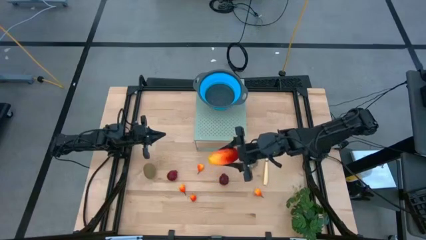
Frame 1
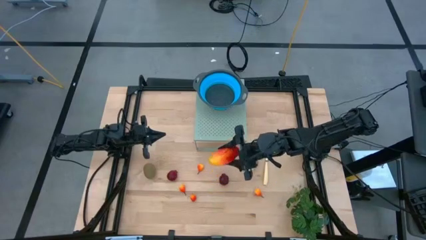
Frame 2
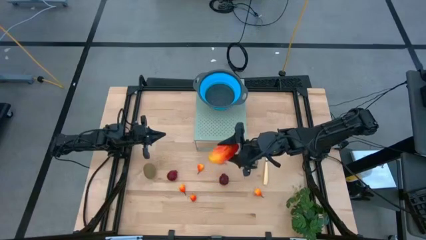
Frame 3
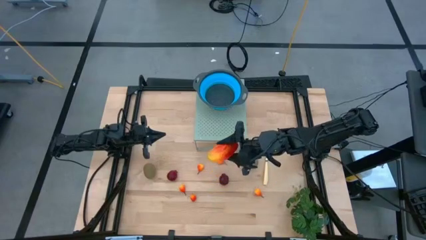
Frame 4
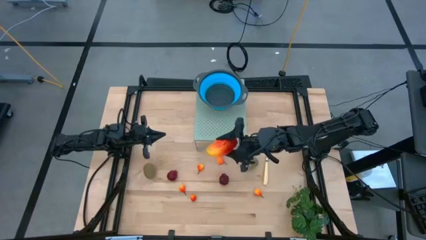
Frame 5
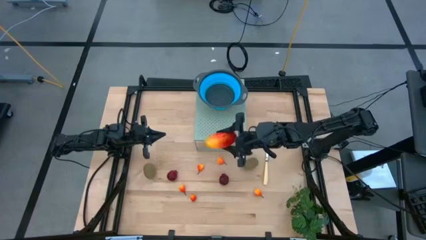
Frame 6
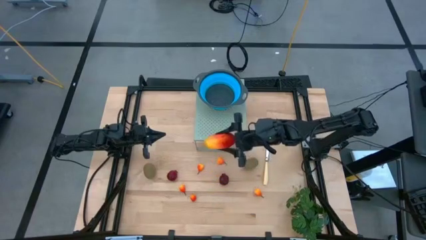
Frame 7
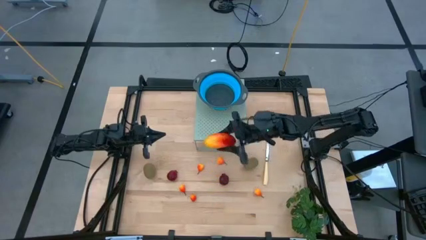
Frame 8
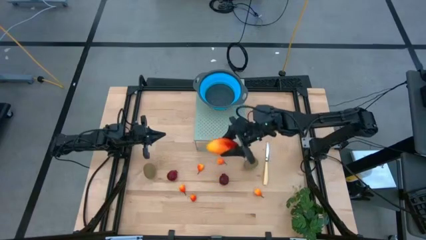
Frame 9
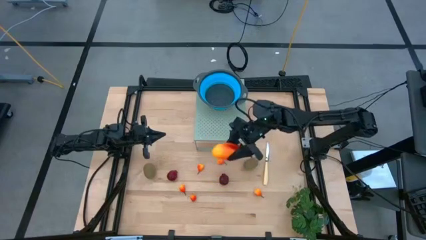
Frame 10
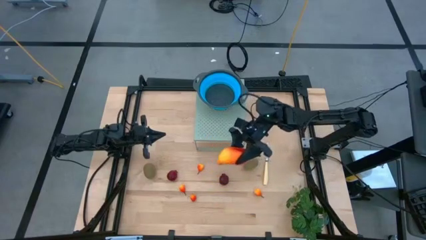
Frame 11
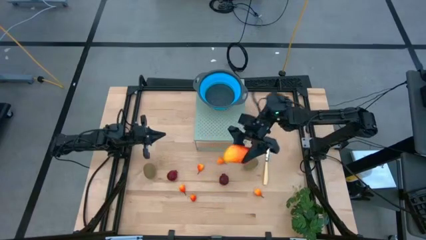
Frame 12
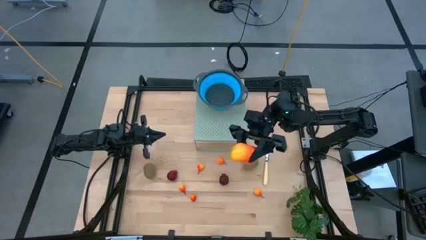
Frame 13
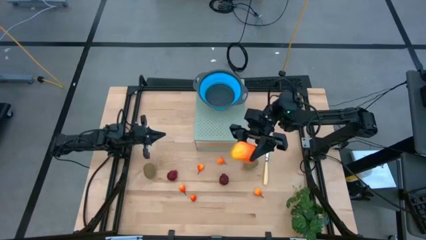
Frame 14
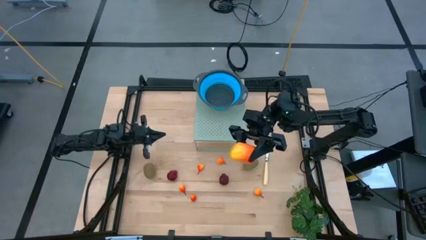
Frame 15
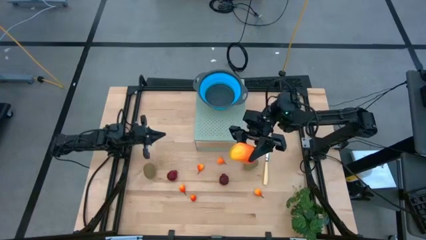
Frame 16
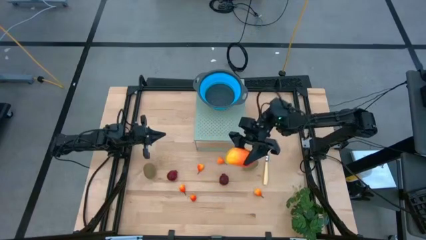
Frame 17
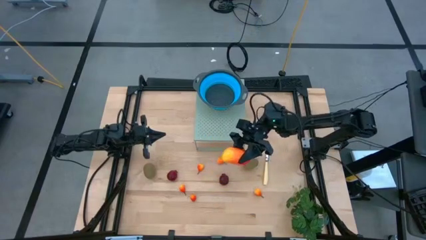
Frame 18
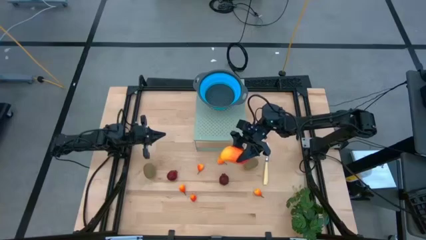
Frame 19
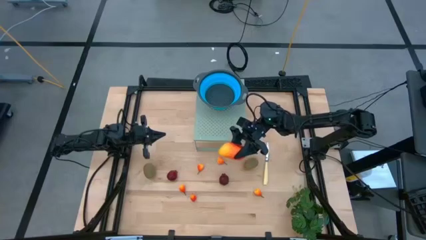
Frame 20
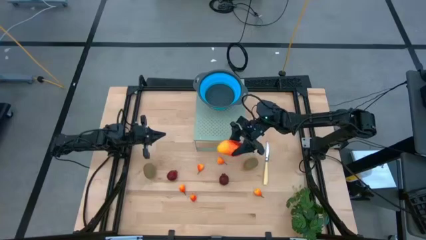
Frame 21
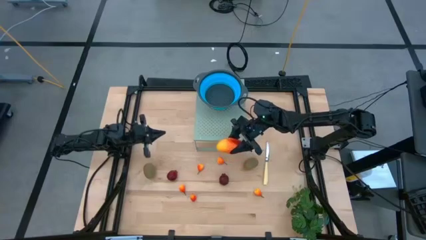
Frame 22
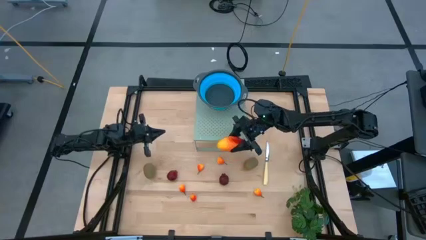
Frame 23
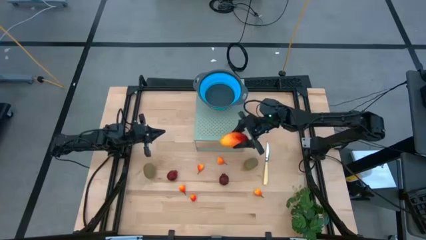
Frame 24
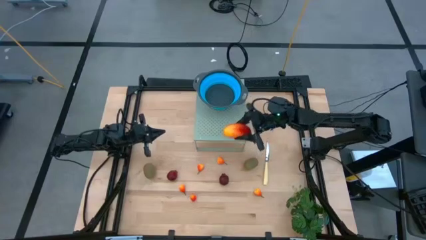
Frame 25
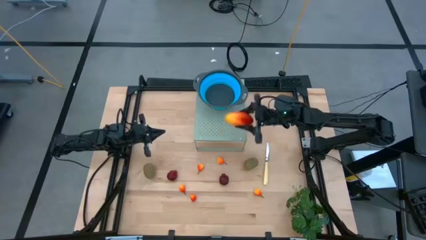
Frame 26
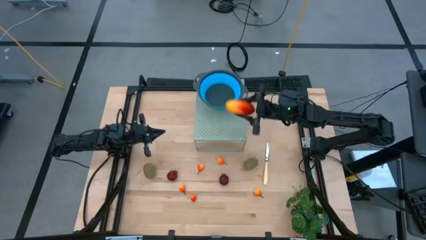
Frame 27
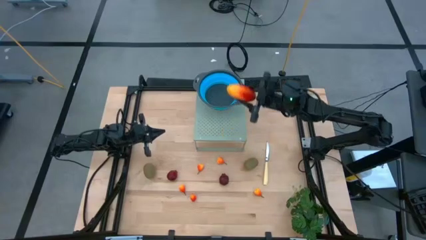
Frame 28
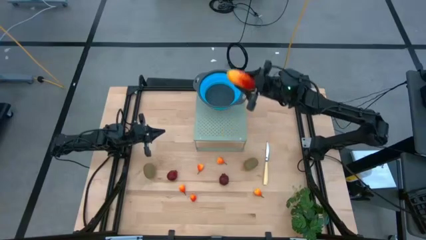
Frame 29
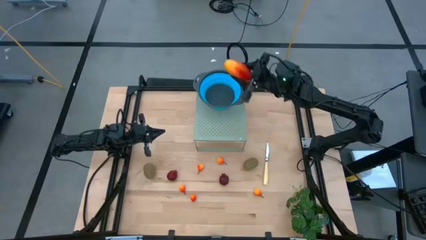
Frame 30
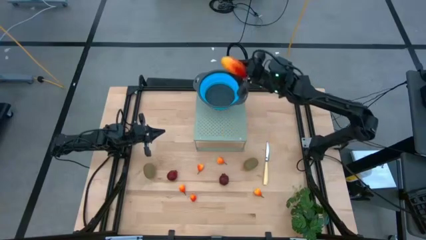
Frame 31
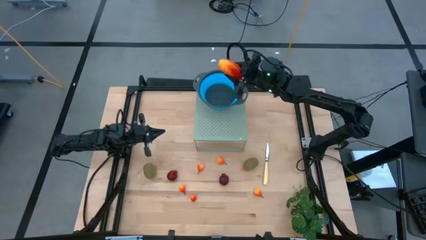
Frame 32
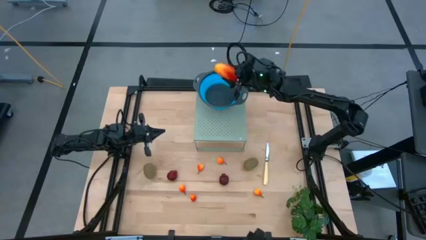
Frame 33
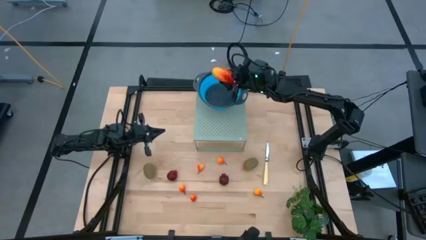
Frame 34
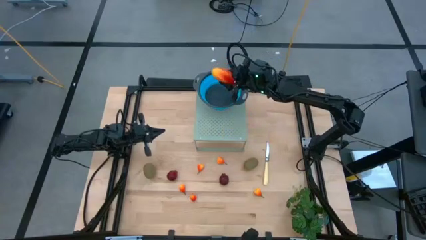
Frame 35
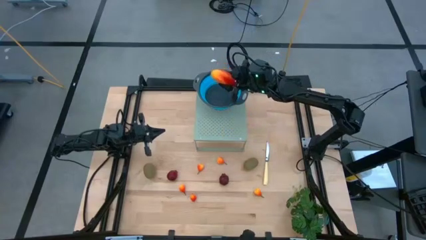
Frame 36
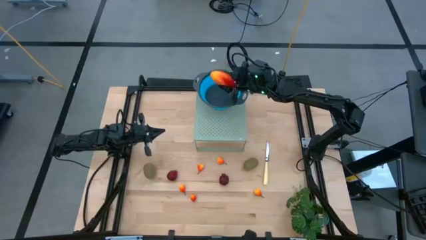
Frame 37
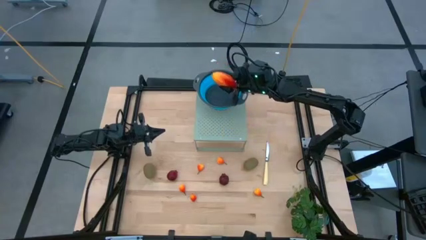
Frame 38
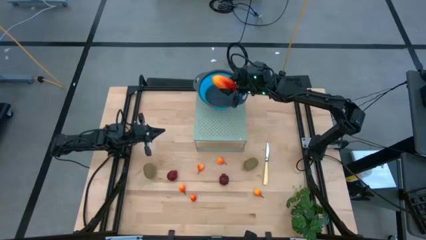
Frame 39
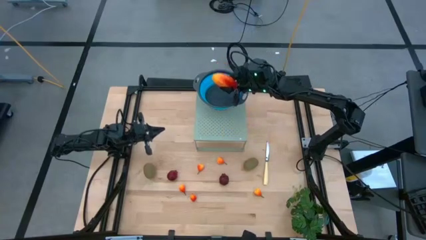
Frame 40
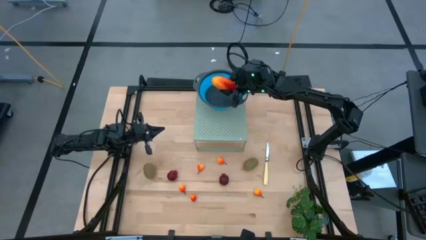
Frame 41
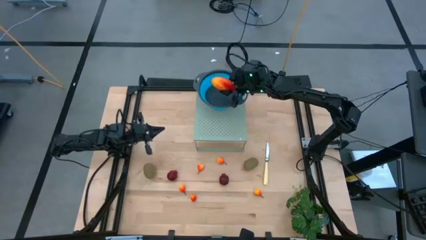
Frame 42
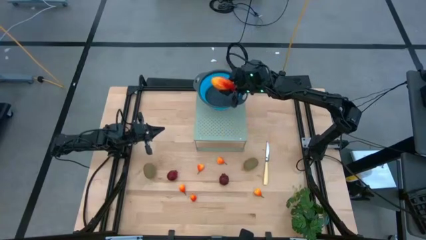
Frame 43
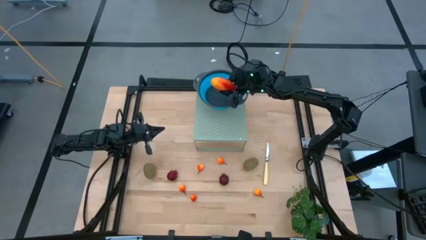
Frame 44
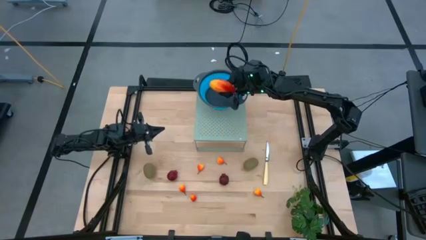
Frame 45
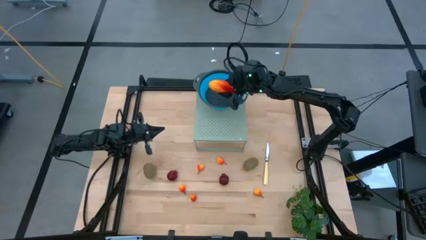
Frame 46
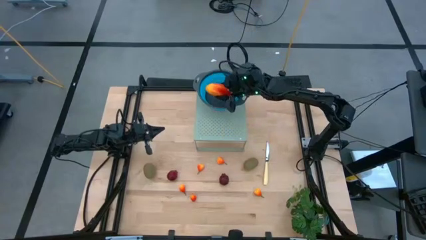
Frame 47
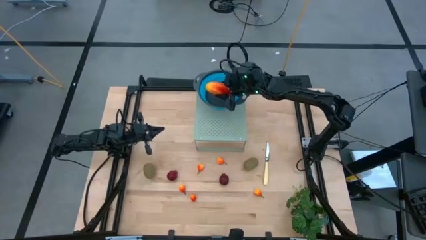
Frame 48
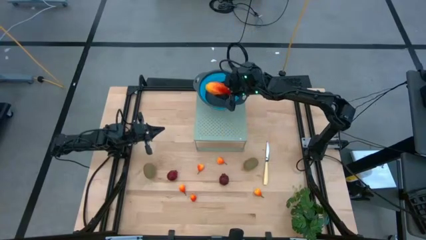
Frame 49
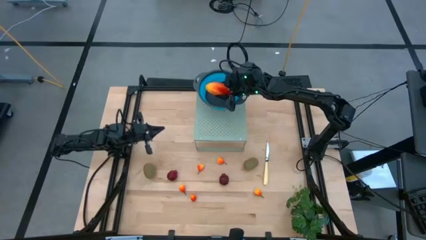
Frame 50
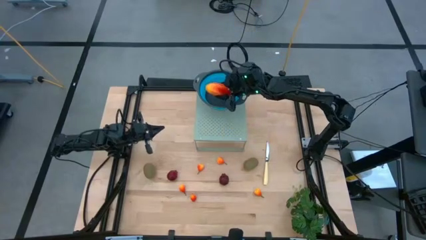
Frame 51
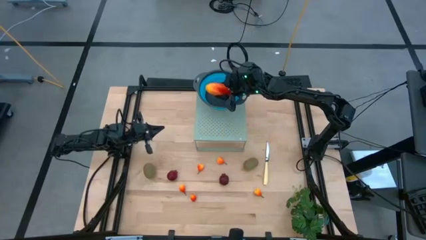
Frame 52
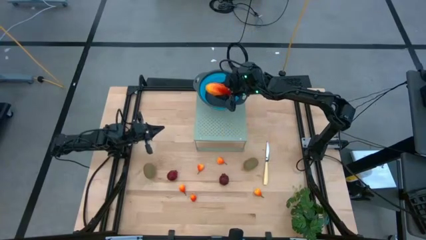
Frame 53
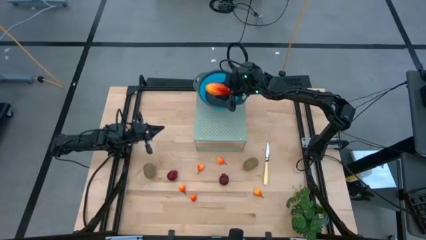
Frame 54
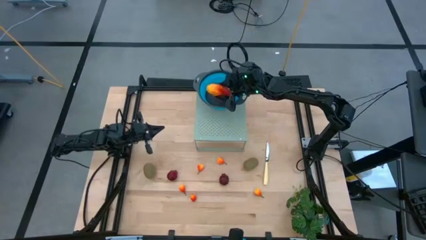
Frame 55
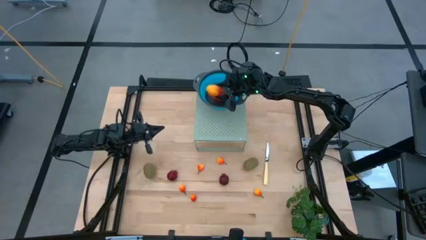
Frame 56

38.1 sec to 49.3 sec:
Task: Pick & Place Fruit
Put the mango into the blue strainer bowl on the shelf
